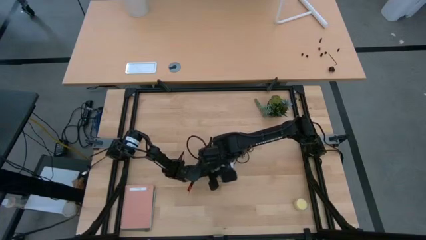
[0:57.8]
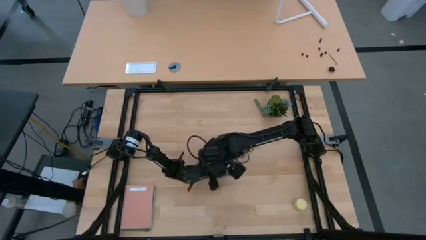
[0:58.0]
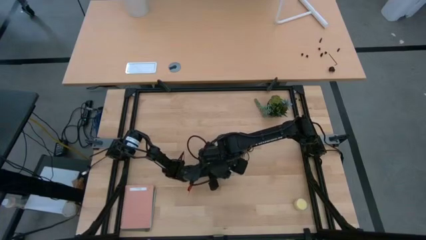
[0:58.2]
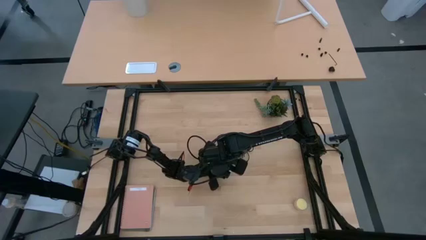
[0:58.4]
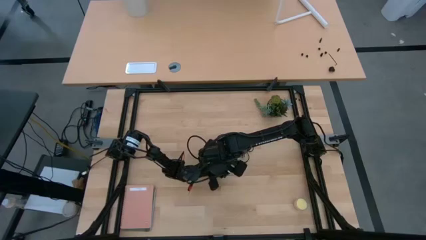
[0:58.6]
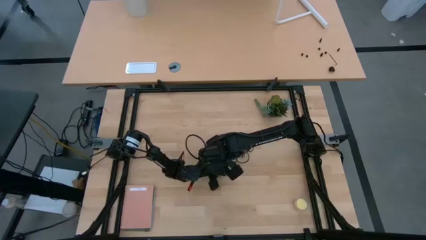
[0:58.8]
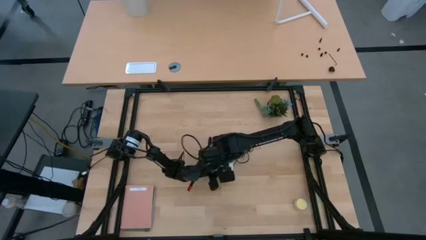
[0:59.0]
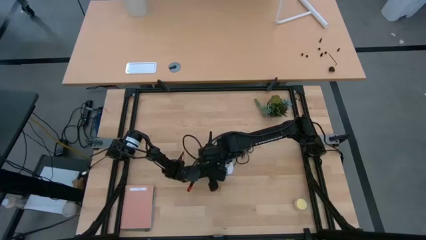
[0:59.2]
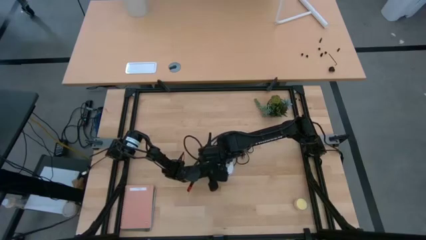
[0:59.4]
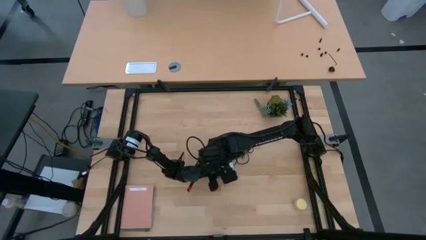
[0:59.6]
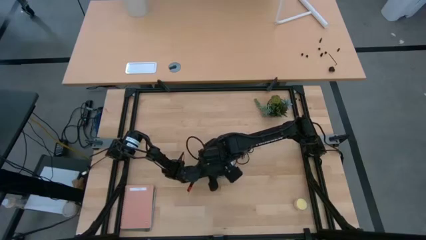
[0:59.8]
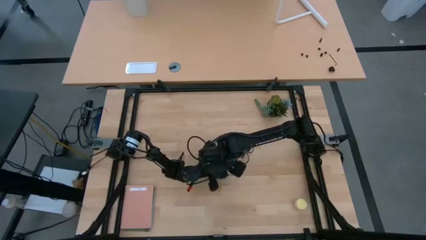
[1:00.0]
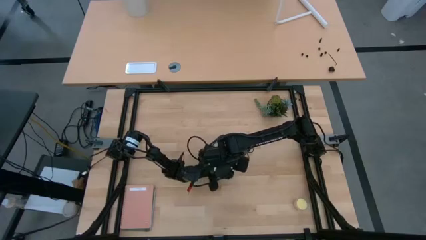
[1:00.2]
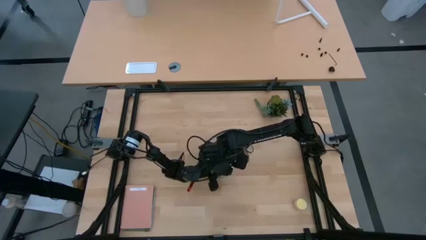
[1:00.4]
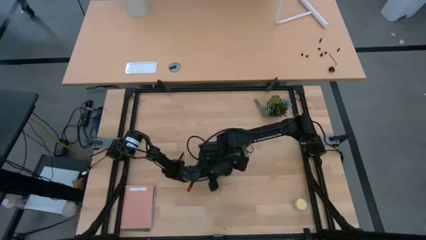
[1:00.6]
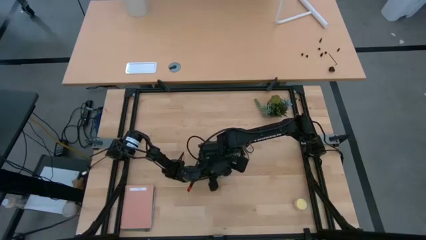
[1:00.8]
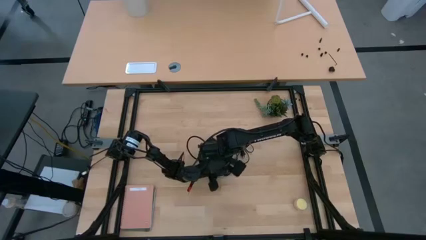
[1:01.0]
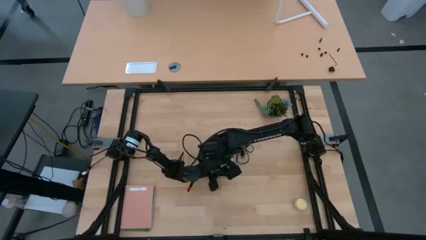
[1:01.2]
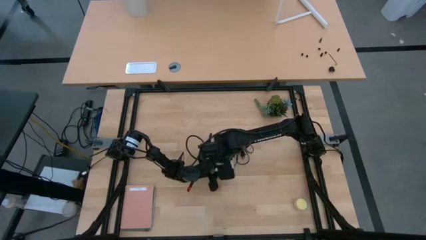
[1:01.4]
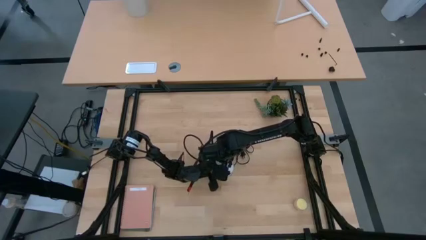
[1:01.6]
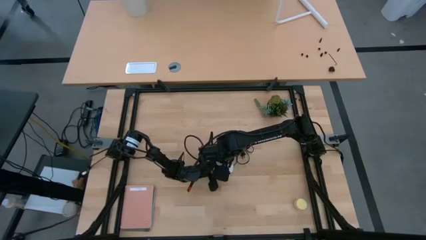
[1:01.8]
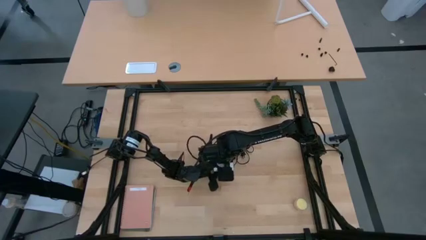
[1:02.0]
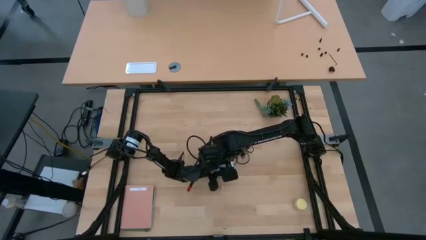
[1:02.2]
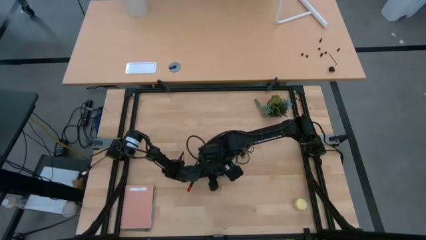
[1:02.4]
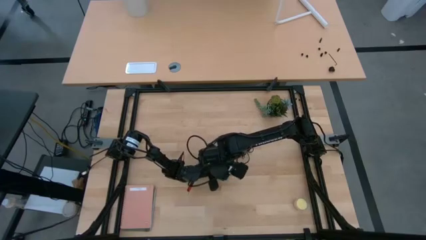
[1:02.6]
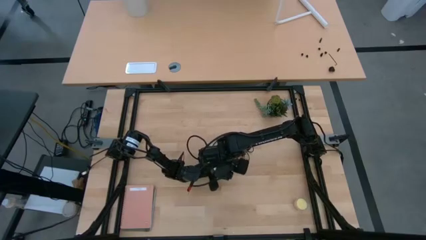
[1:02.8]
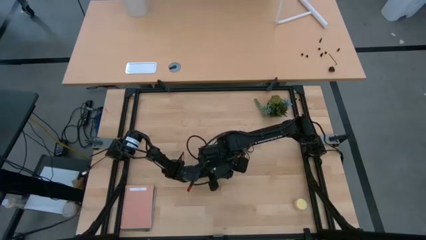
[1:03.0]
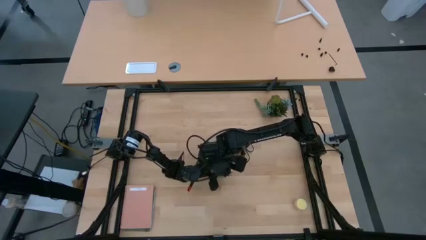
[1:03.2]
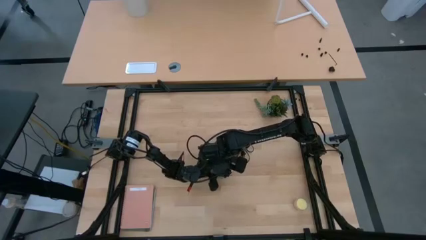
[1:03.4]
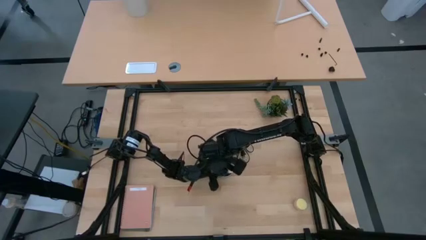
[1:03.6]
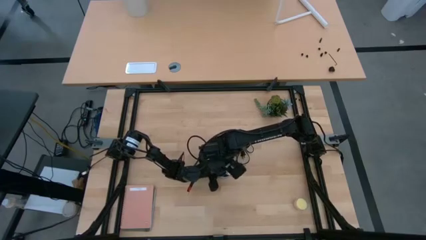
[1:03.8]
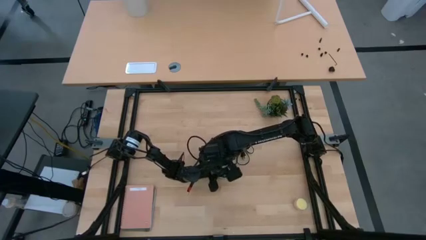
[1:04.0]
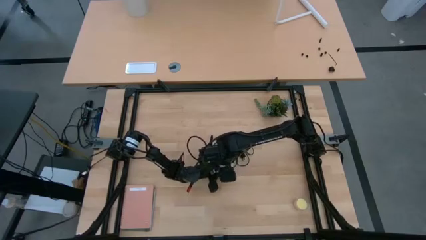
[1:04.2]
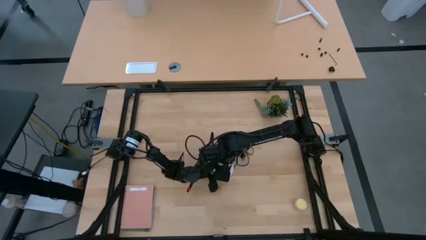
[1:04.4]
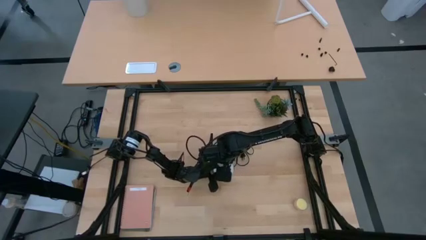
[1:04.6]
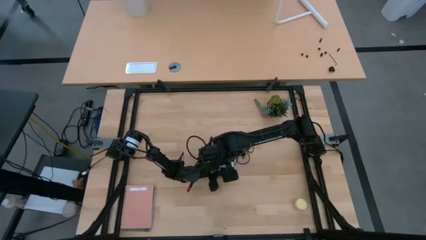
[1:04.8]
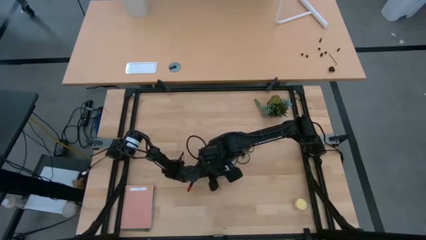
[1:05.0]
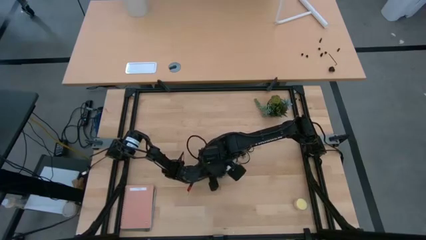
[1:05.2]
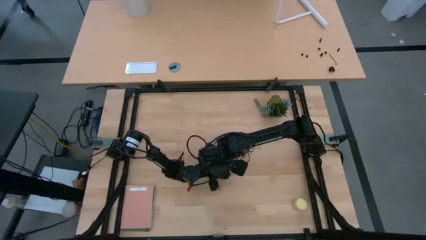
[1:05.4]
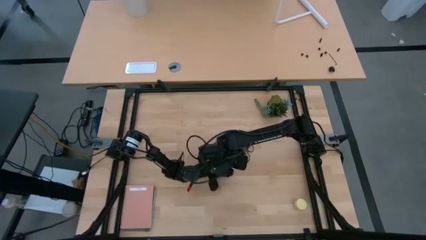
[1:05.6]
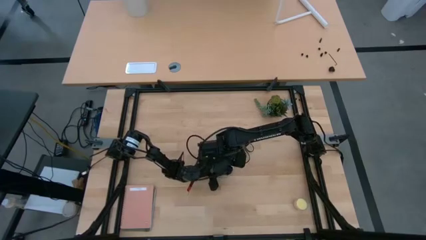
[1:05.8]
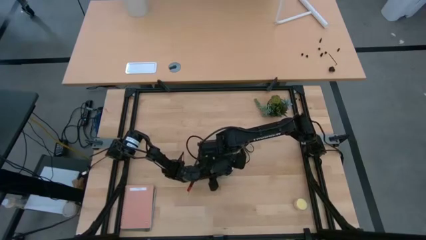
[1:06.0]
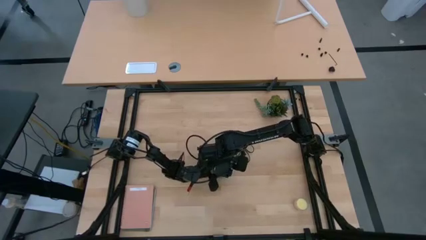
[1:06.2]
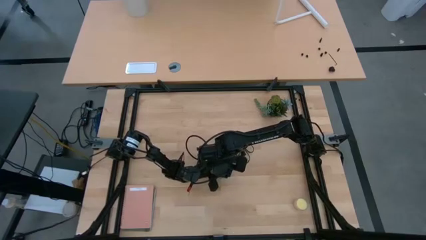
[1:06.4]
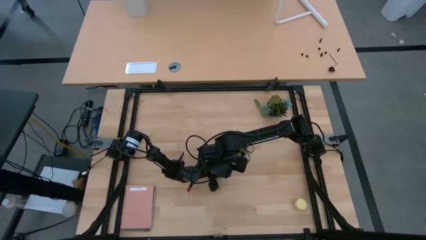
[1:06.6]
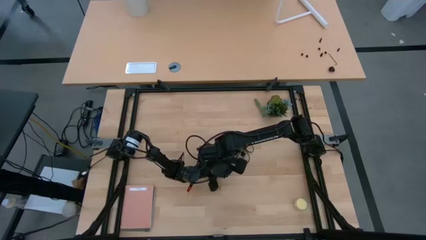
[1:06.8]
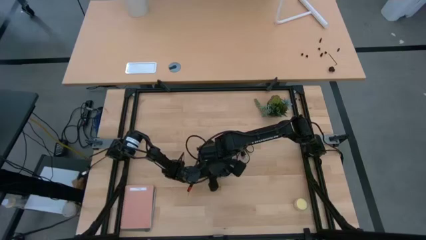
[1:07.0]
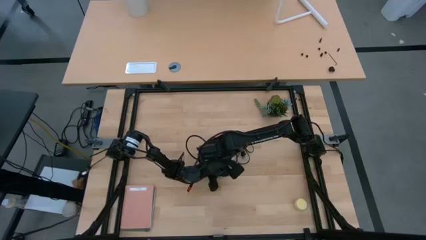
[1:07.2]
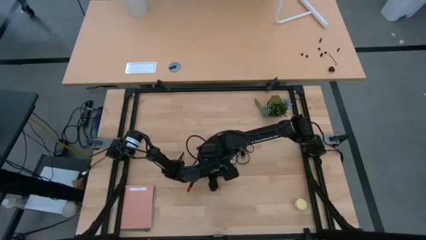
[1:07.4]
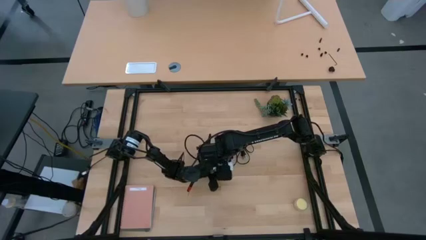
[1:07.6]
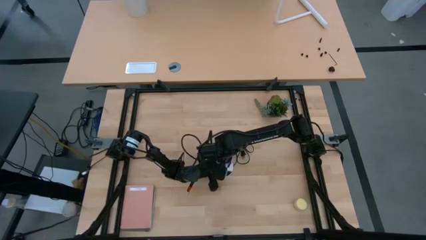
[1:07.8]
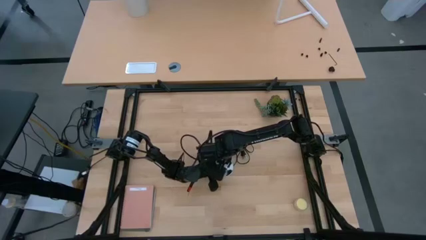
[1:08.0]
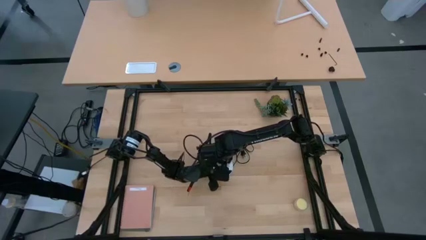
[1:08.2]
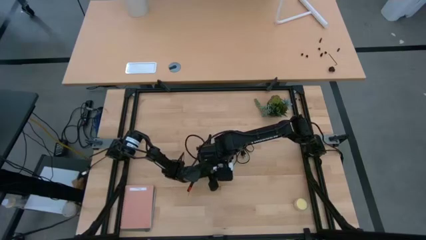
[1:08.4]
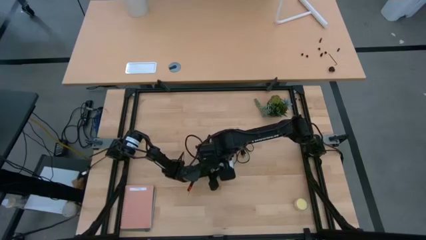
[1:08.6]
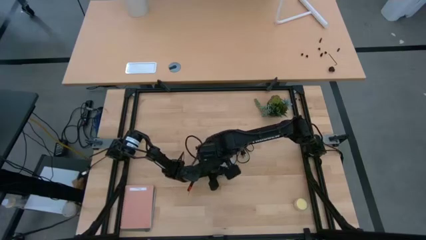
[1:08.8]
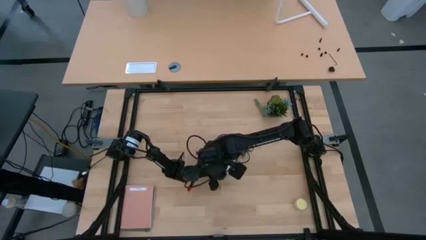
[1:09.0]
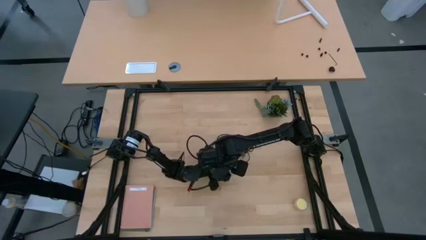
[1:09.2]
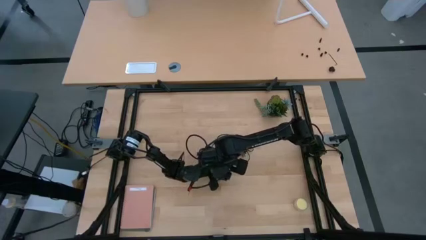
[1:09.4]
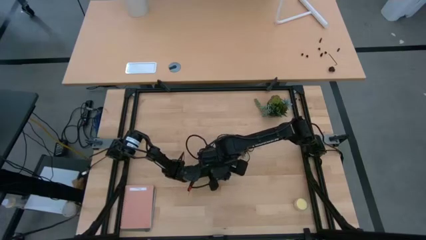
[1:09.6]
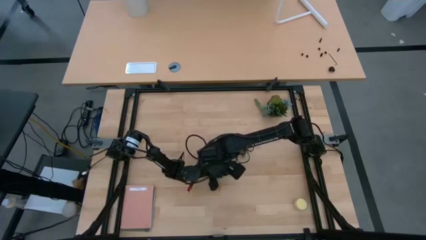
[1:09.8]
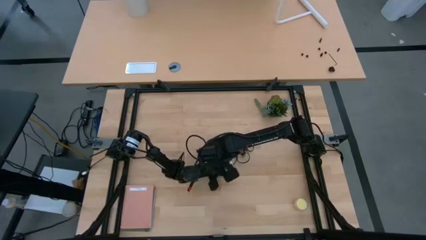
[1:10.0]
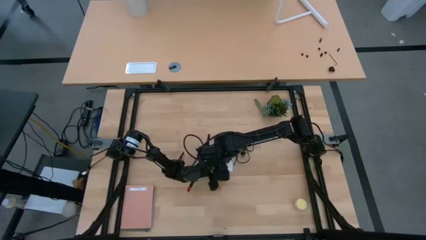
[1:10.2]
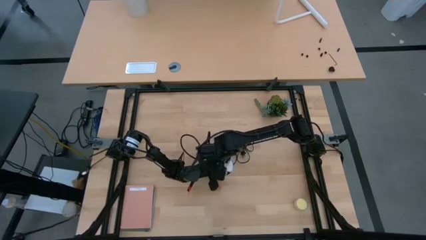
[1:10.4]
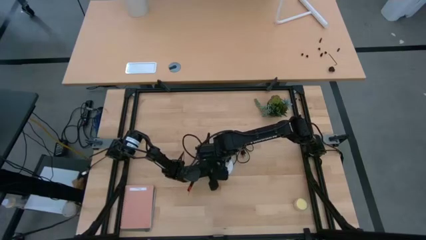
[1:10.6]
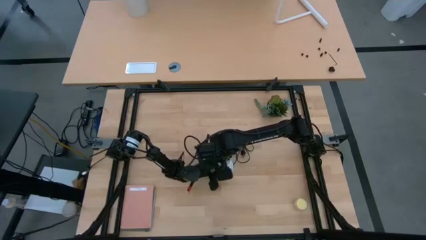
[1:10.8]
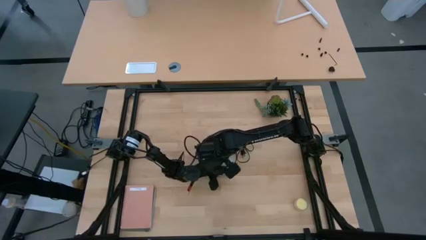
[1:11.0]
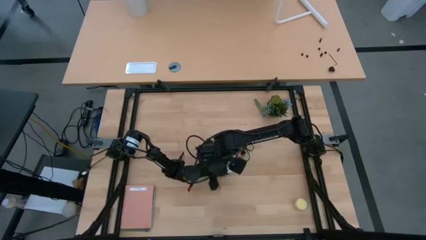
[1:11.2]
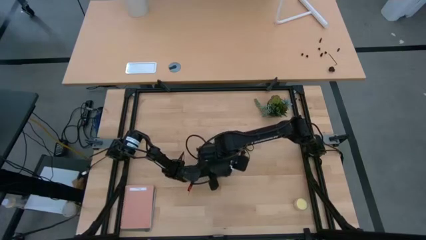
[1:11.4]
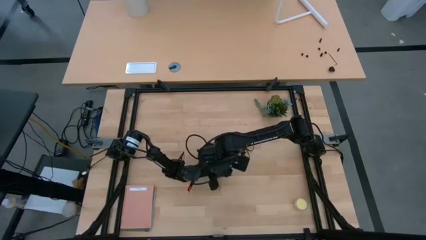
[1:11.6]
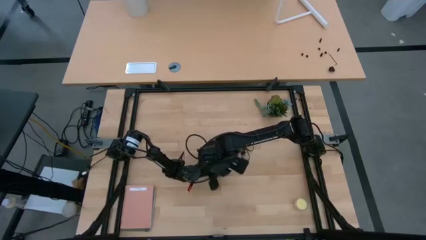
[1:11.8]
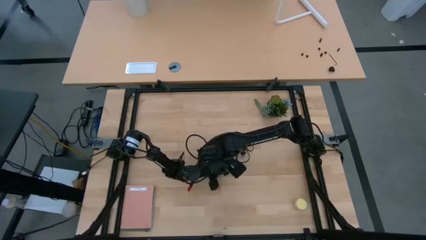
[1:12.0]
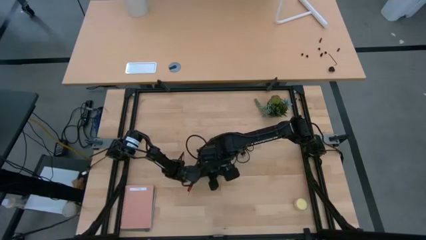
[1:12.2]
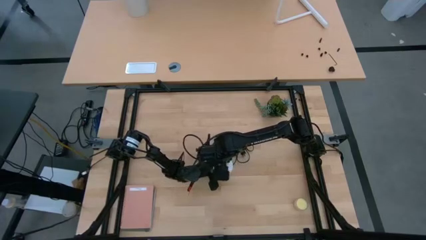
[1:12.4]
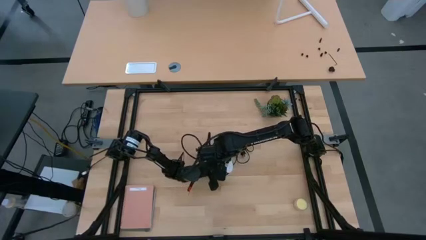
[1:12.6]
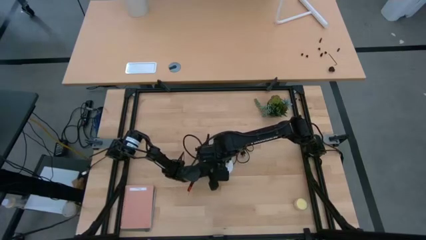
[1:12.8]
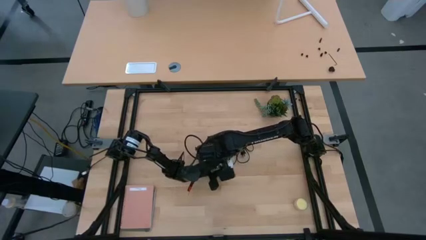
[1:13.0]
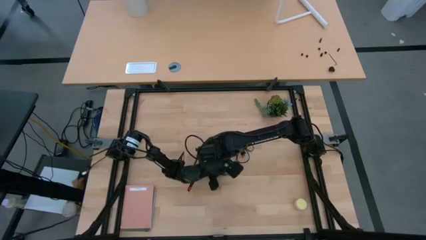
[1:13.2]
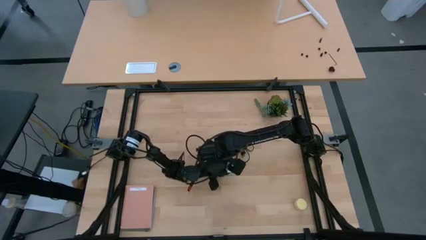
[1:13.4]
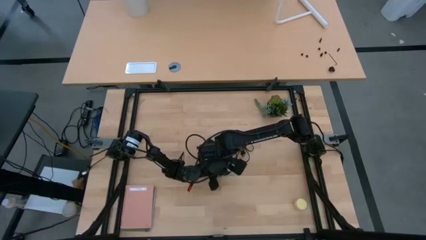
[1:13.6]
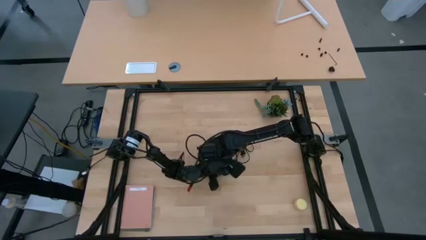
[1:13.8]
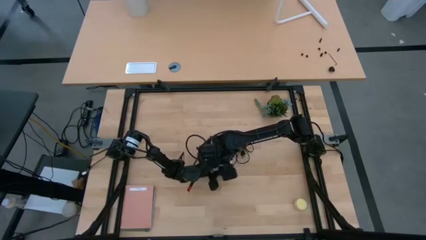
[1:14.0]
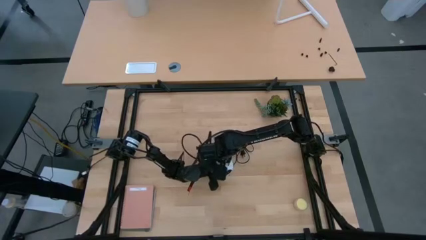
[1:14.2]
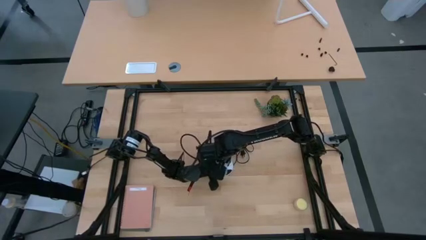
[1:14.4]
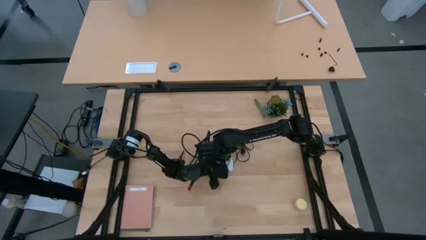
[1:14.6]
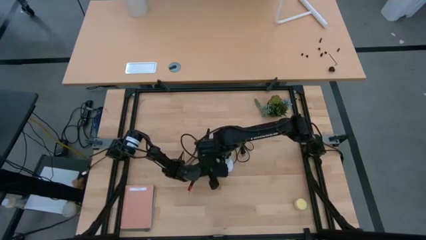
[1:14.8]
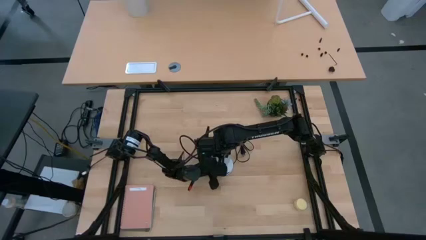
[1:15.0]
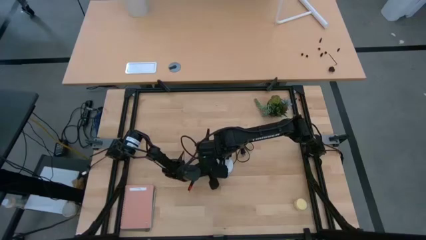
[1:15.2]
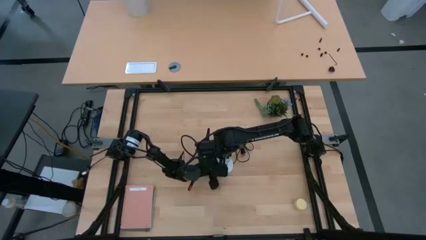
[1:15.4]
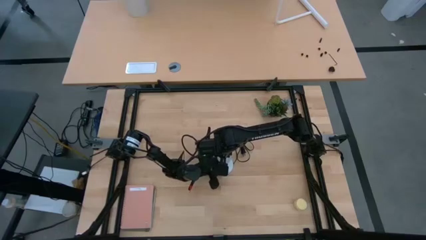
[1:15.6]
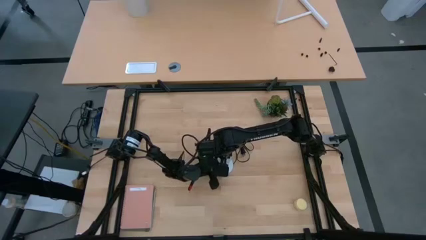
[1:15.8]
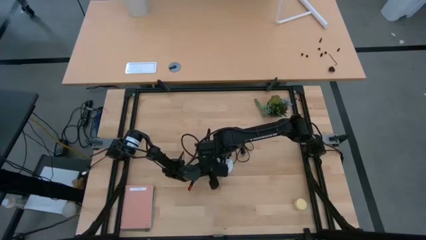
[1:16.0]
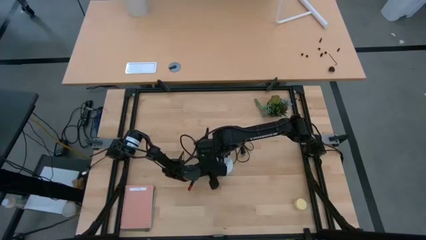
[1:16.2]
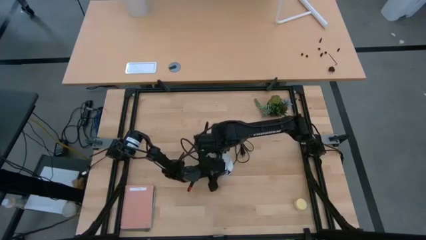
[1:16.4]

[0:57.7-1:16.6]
Task: Screw lightbulb
Insert the lightbulb into the silver lamp
